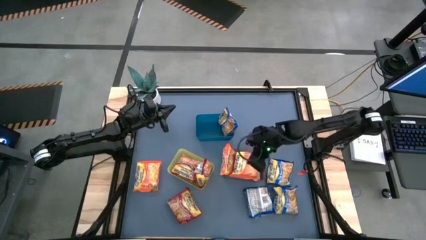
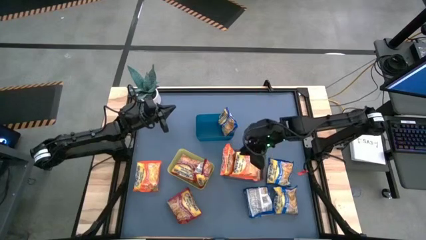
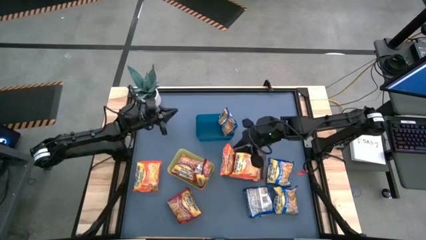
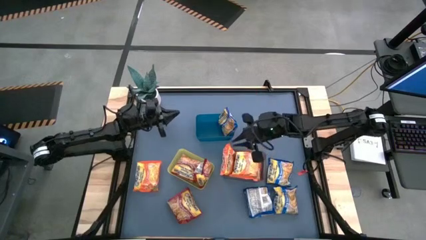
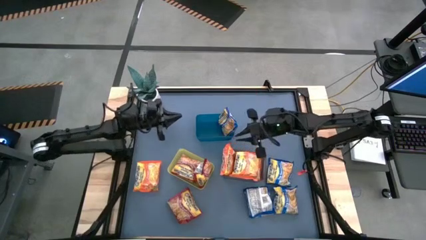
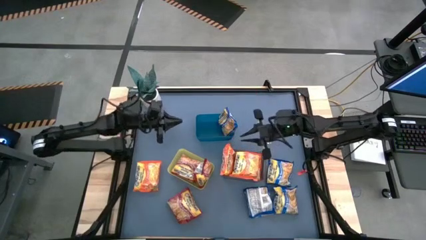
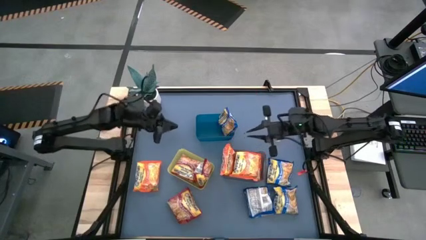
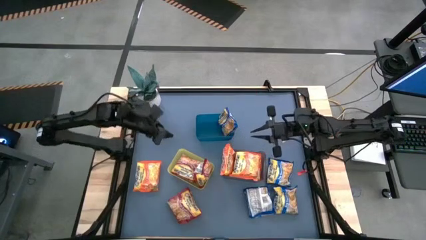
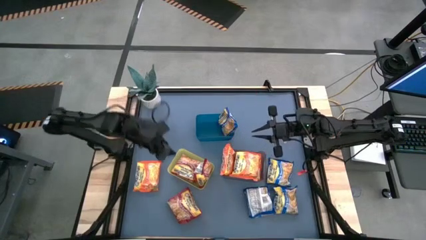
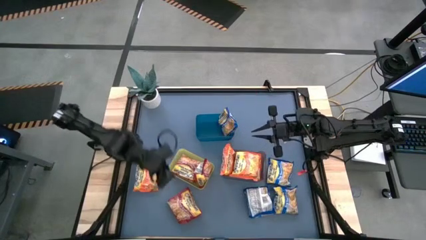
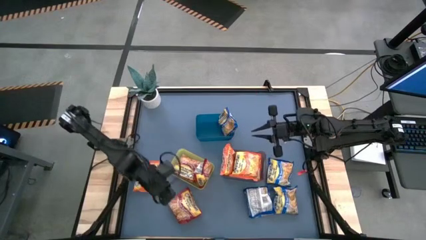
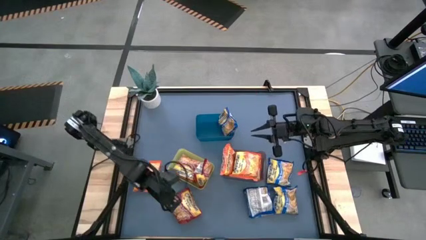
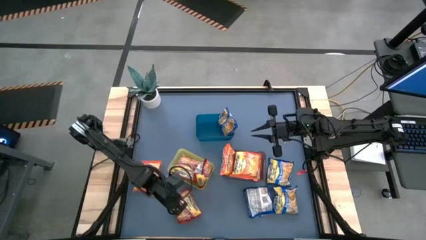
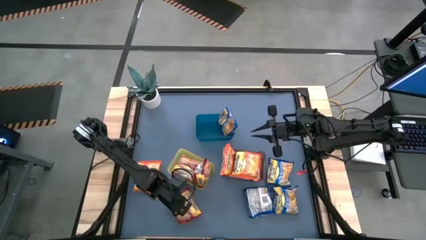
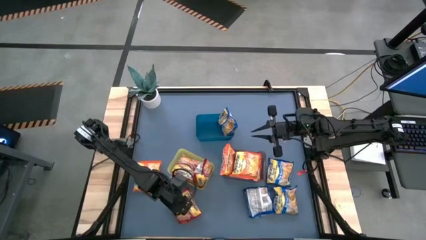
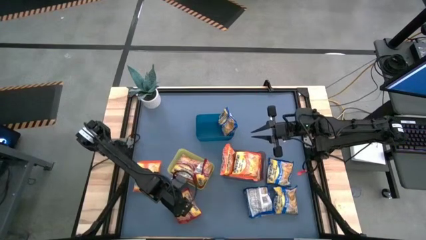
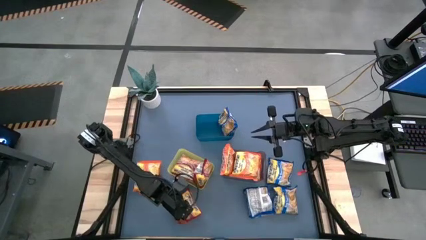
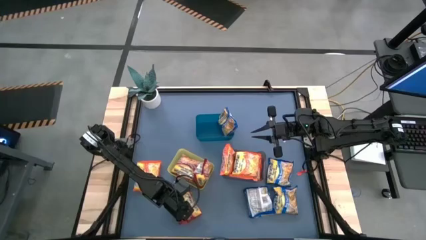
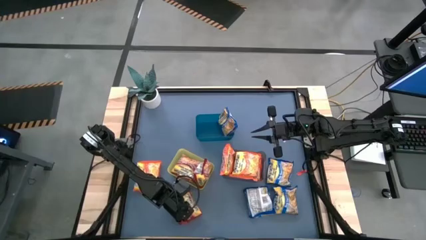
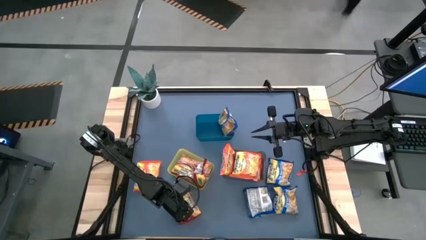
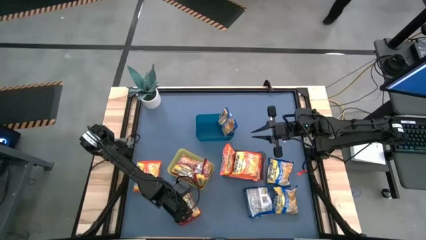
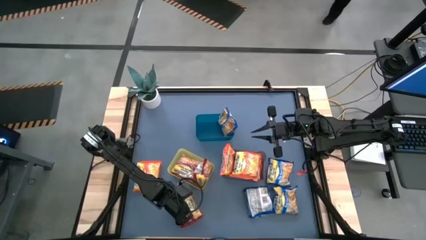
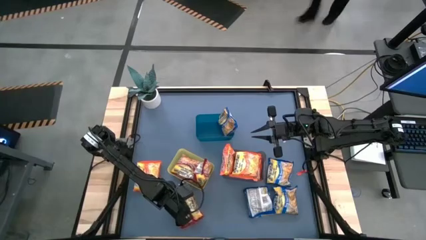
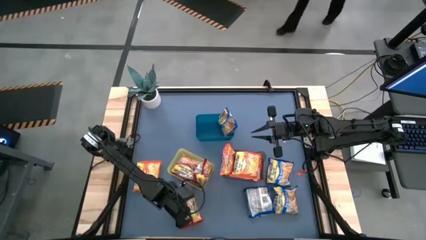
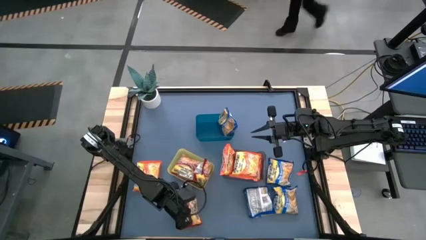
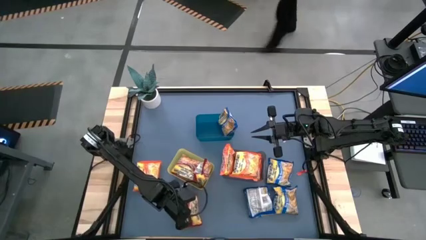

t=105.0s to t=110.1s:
Task: Sort Maruchan noodles
Stack the red noodle pack on top of the red noodle pack in the yellow bin

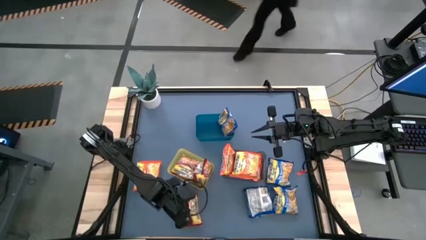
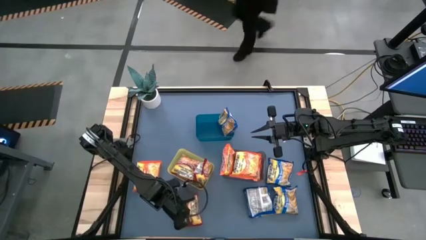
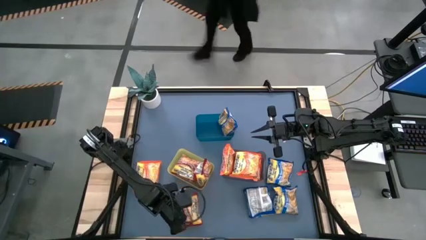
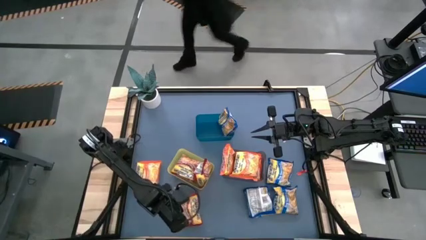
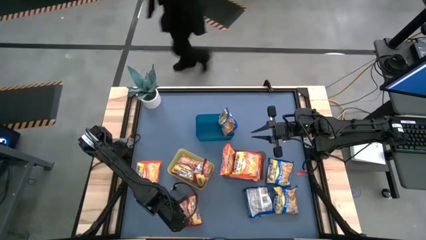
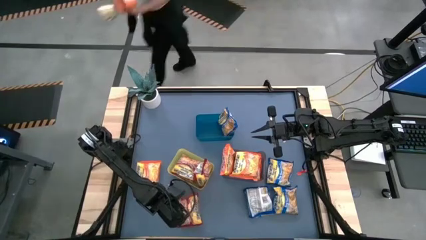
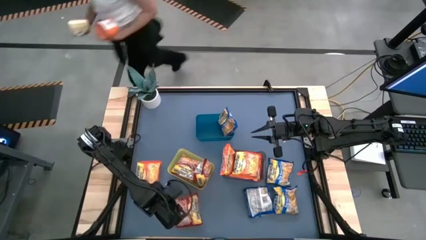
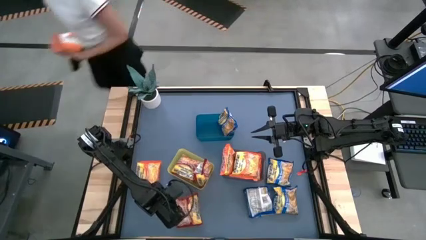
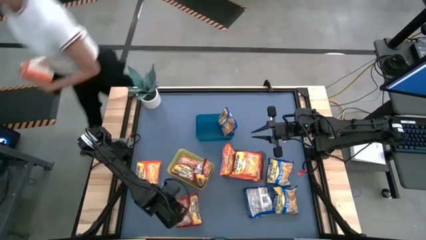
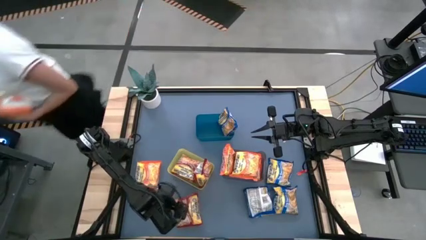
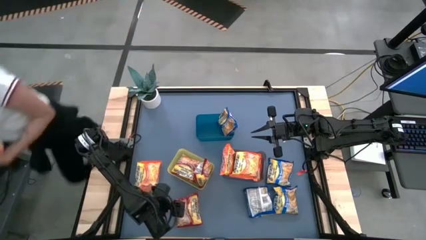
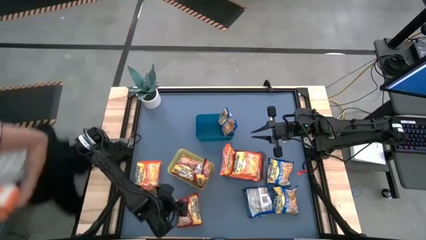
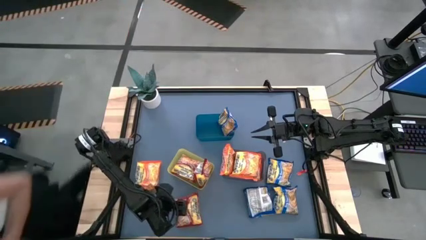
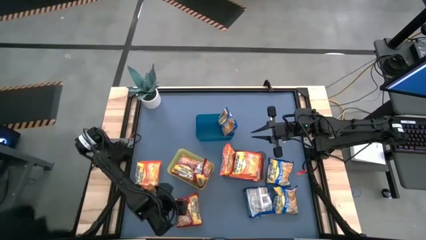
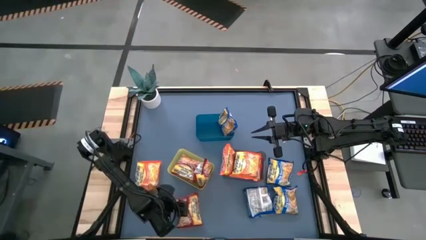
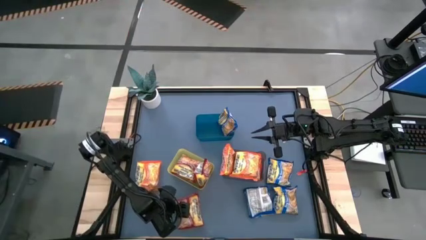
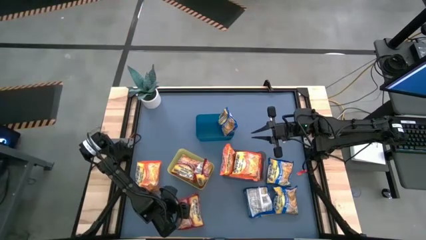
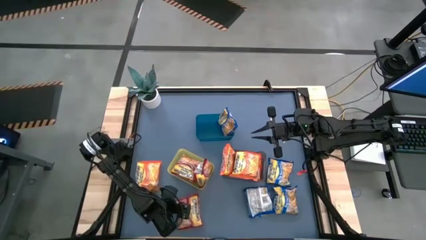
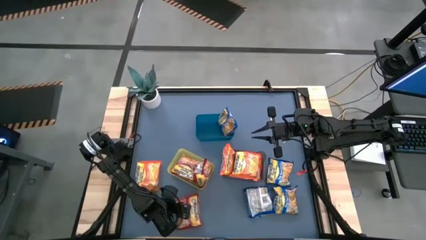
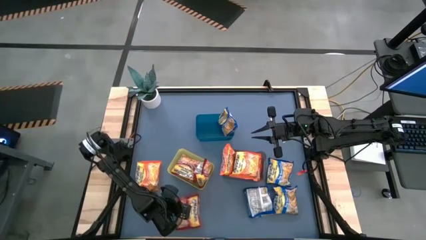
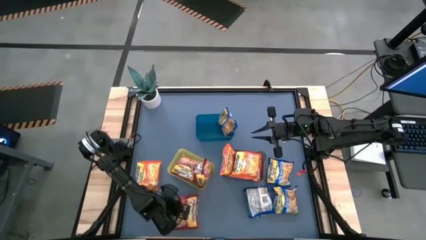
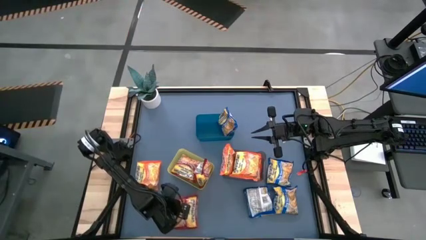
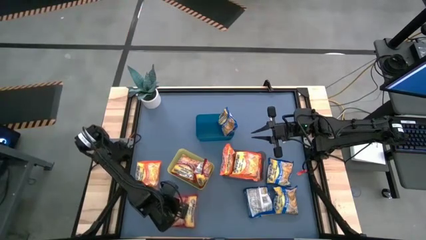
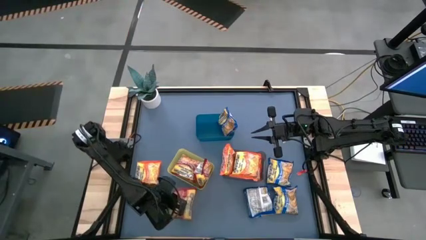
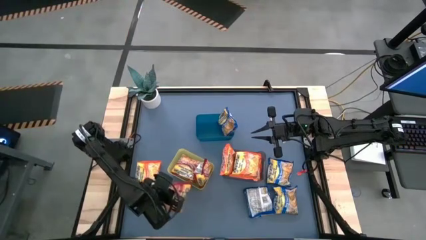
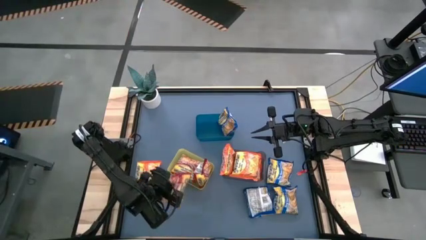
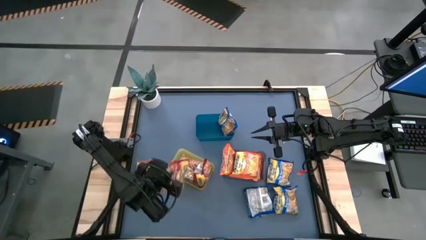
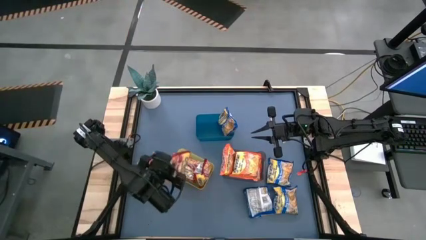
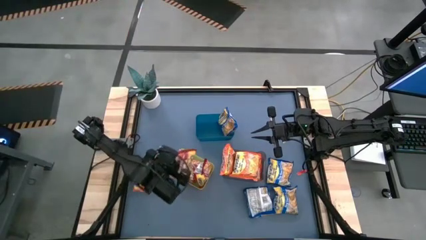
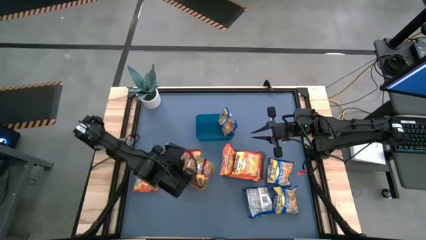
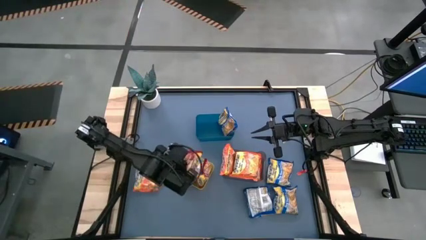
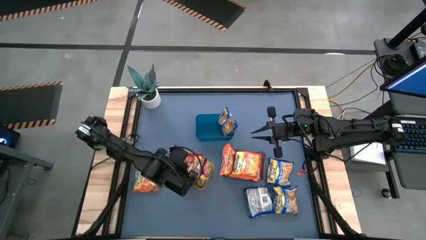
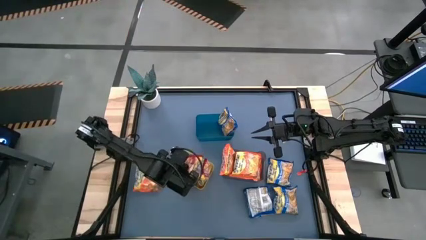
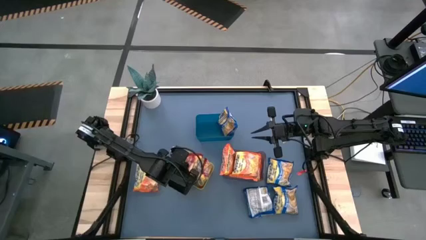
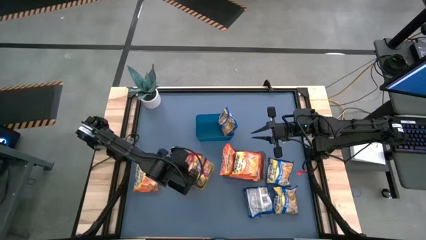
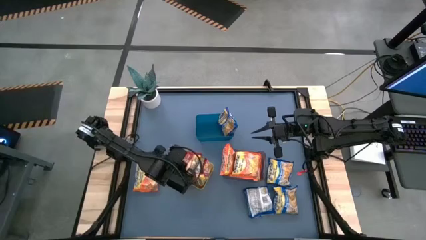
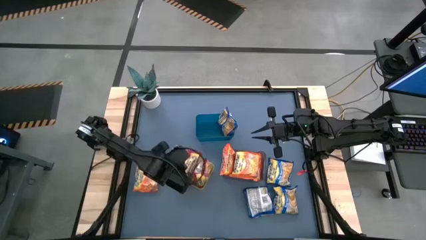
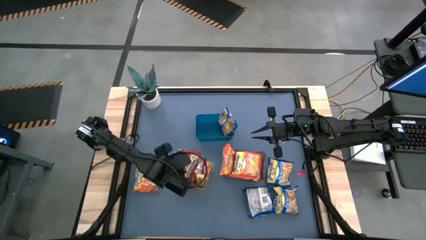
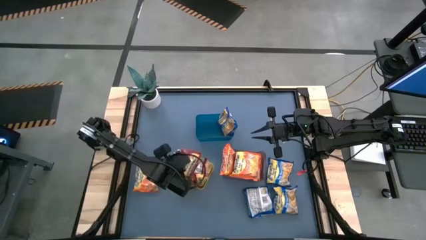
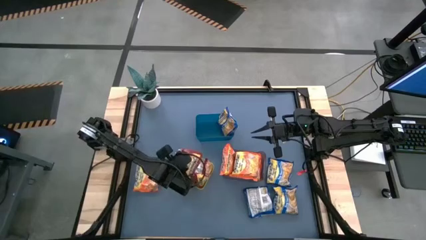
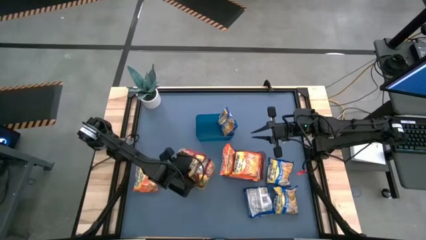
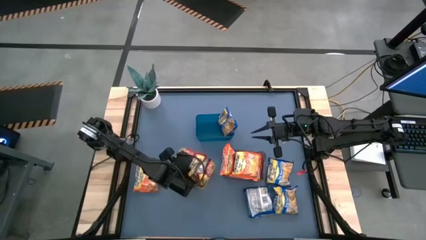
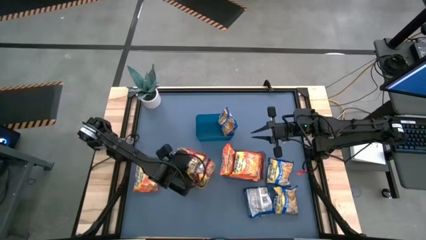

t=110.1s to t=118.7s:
Stack the red noodle pack on top of the red noodle pack in the yellow bin
